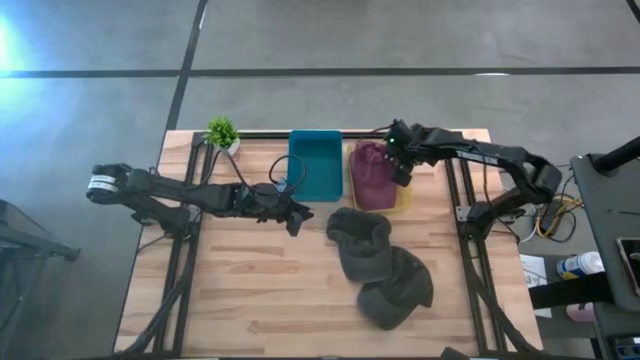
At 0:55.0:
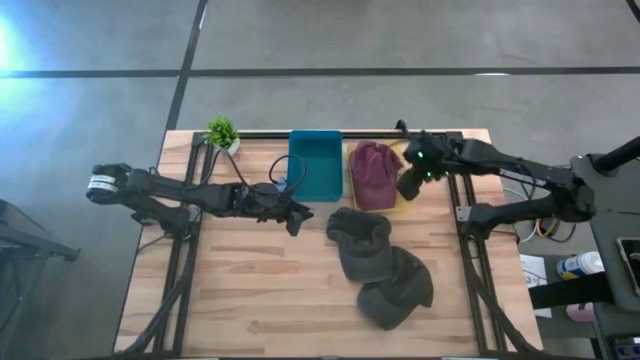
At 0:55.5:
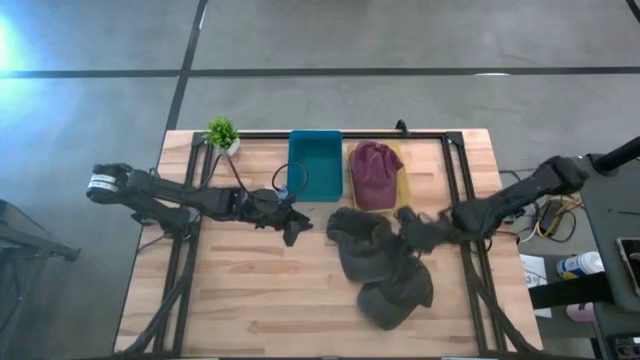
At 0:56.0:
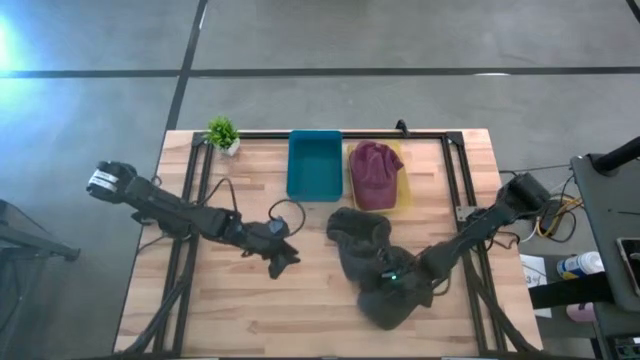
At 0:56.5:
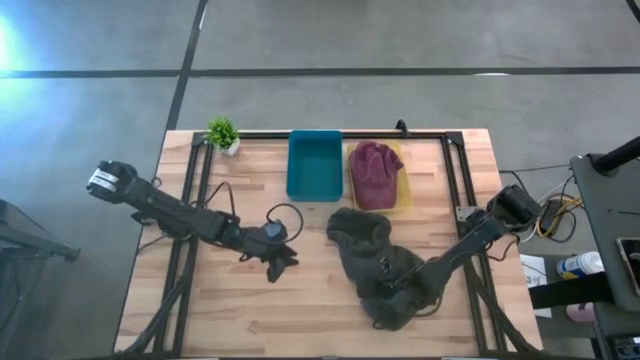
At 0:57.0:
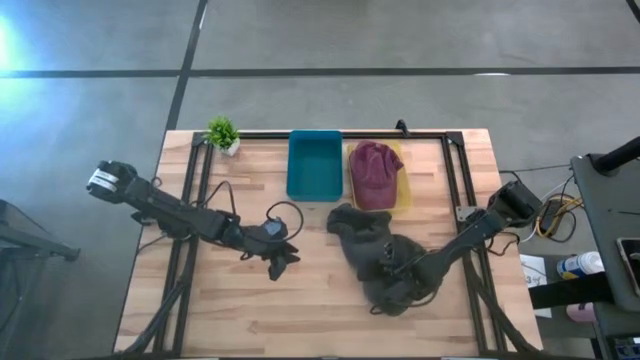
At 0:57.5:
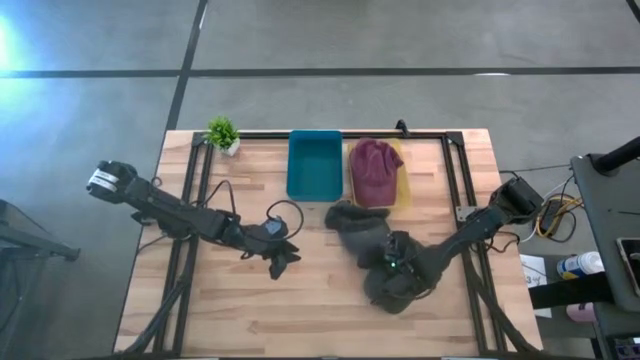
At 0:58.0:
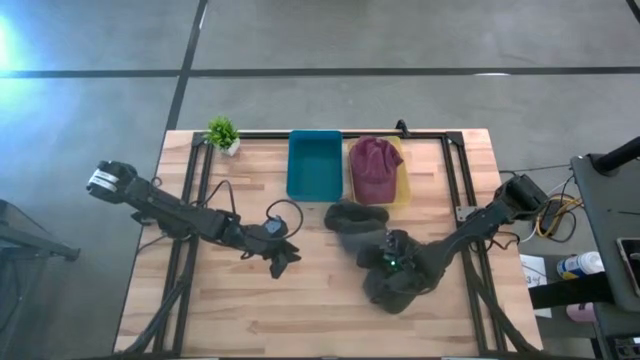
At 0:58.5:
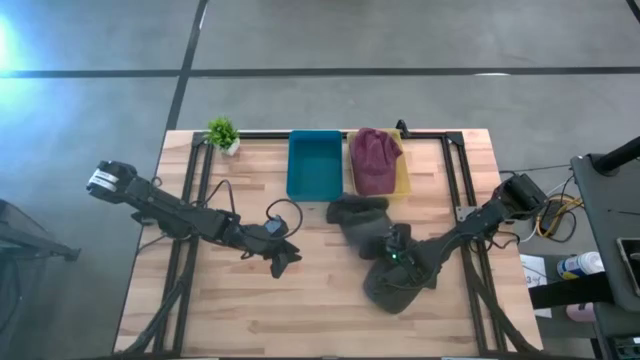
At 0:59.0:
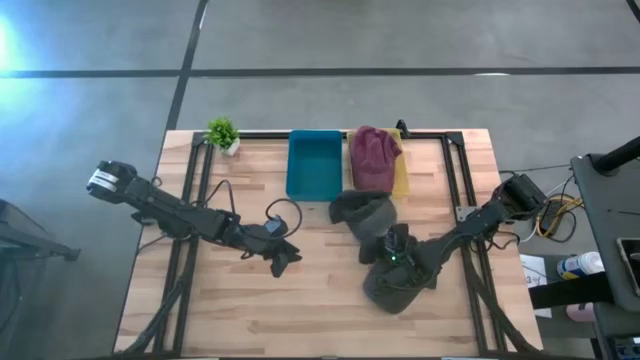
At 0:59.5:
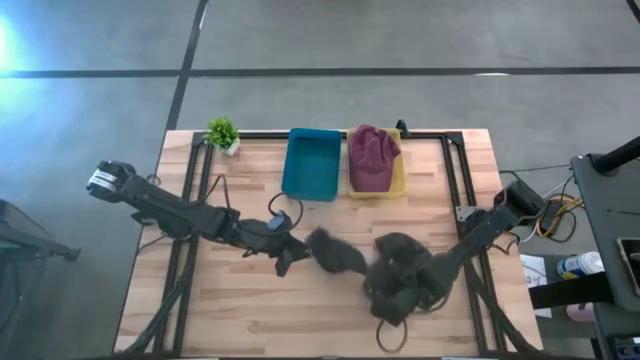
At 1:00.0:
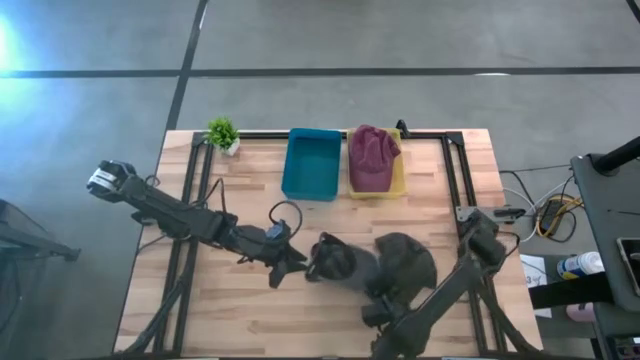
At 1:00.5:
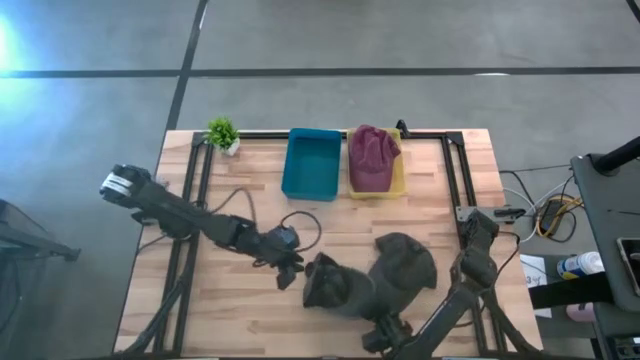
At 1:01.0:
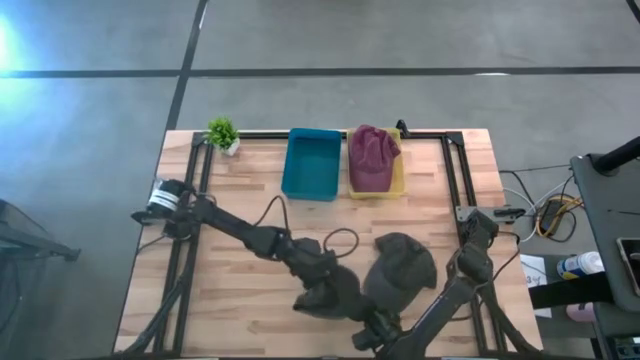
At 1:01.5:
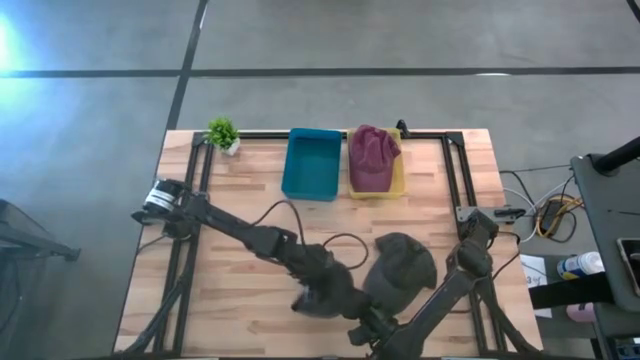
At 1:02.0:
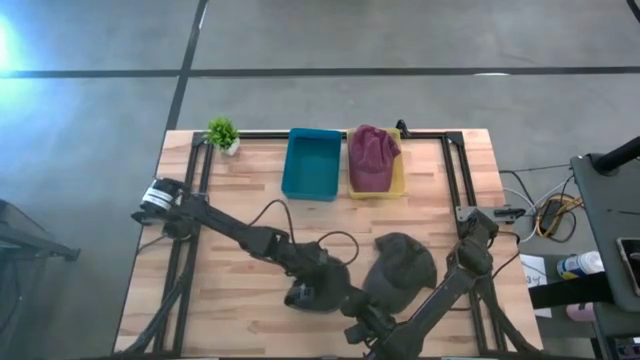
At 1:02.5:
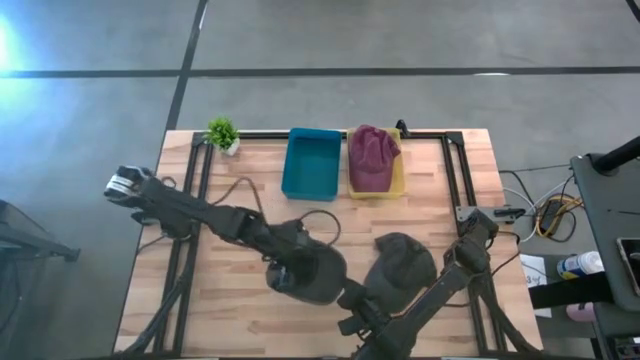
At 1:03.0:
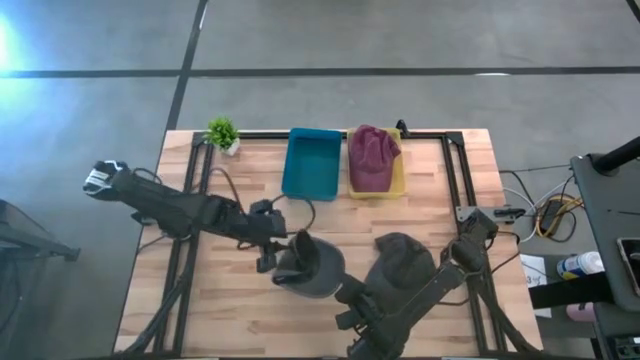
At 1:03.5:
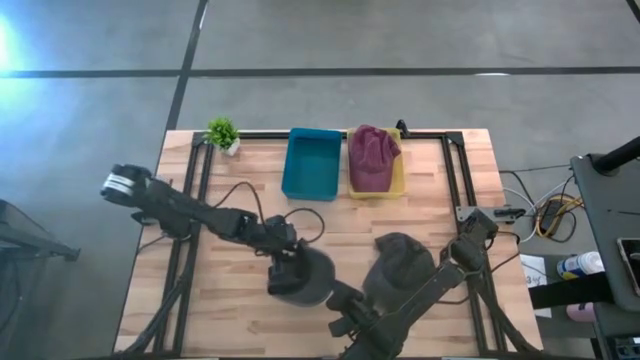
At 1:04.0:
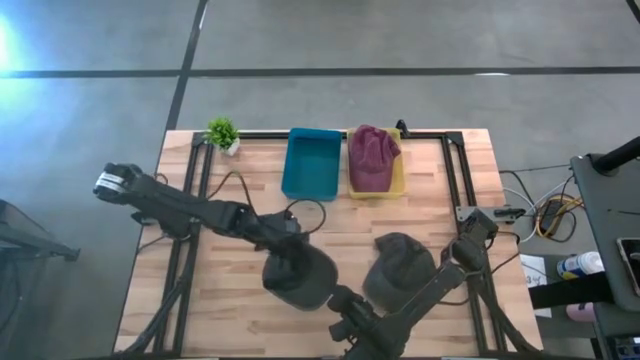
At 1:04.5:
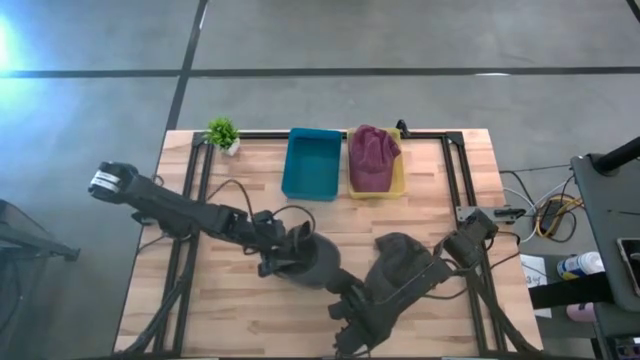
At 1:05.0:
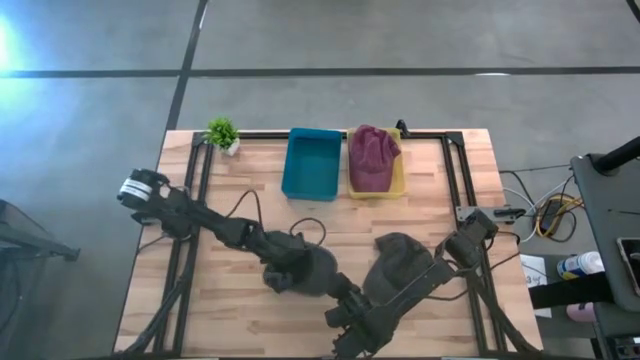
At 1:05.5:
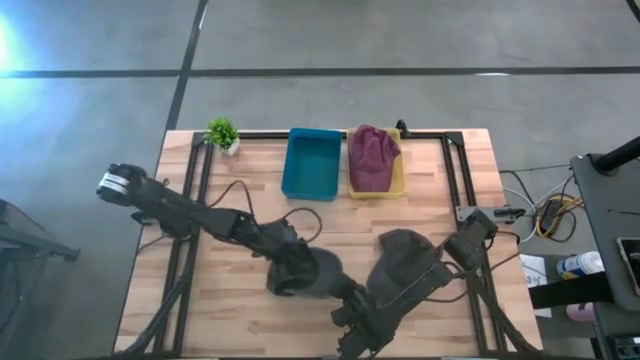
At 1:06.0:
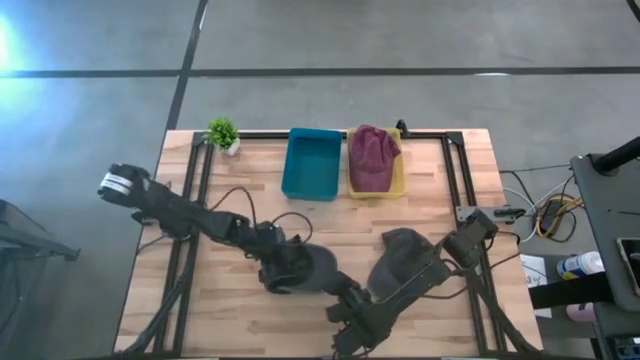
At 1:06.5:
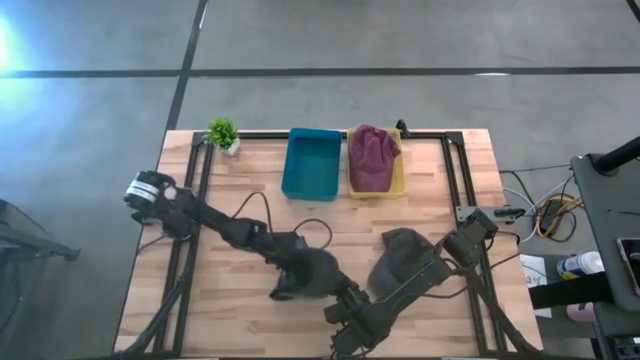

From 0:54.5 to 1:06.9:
Task: Pick & Place hat
Put the top black cap into the blue bin

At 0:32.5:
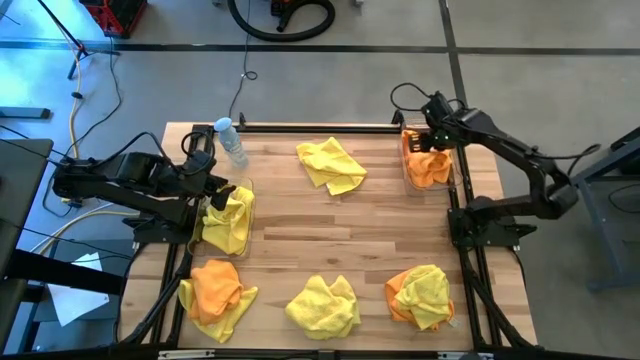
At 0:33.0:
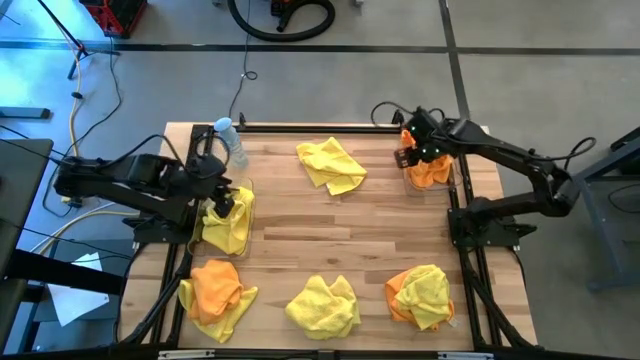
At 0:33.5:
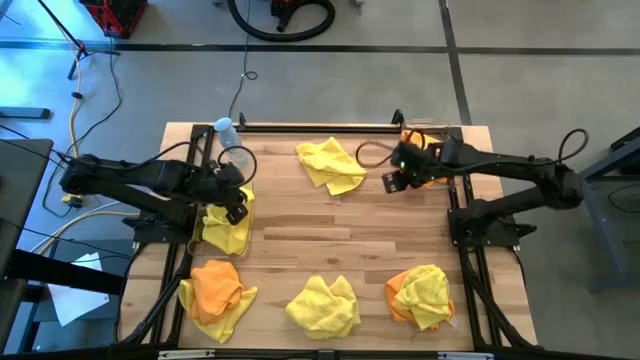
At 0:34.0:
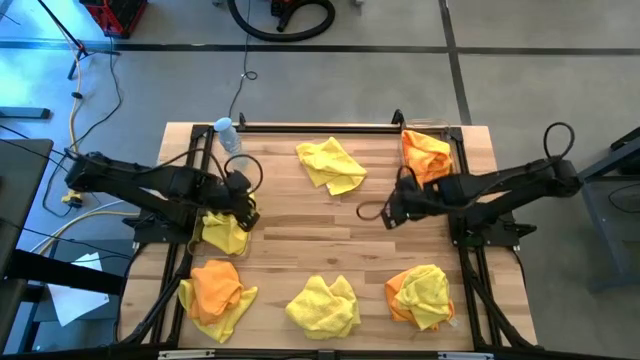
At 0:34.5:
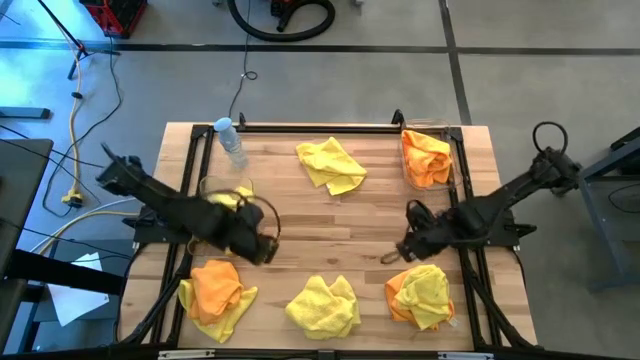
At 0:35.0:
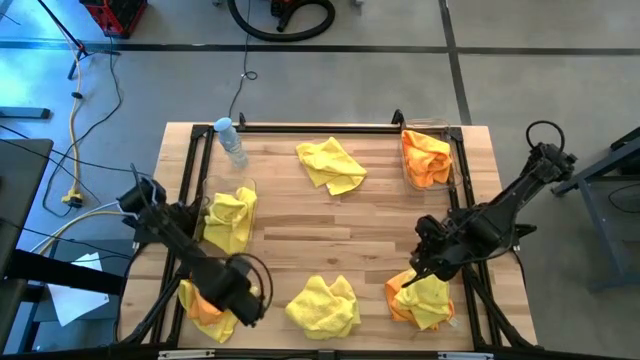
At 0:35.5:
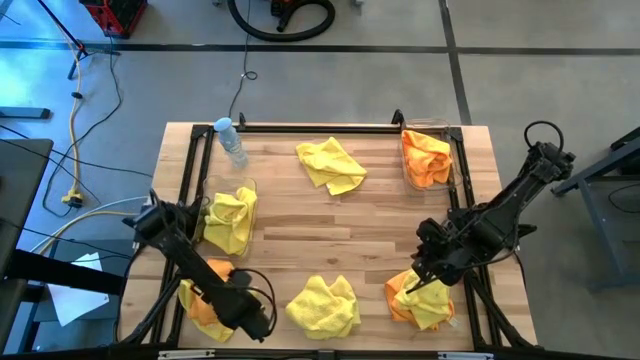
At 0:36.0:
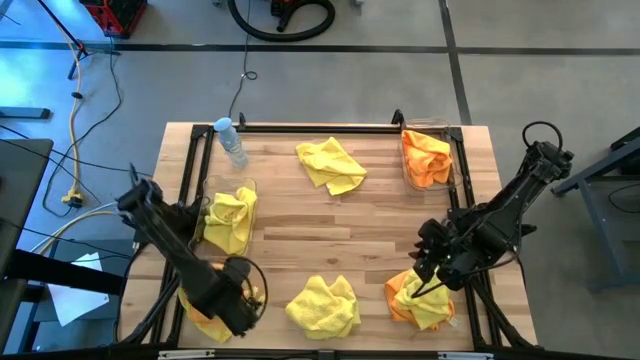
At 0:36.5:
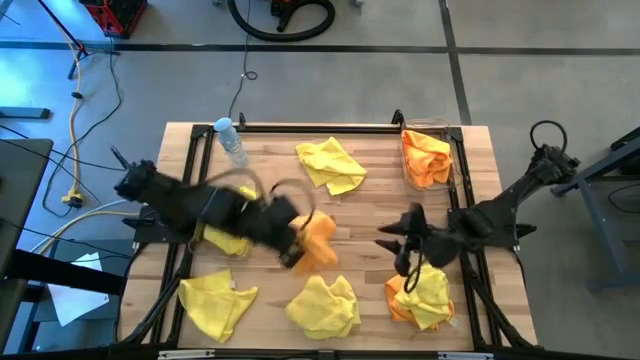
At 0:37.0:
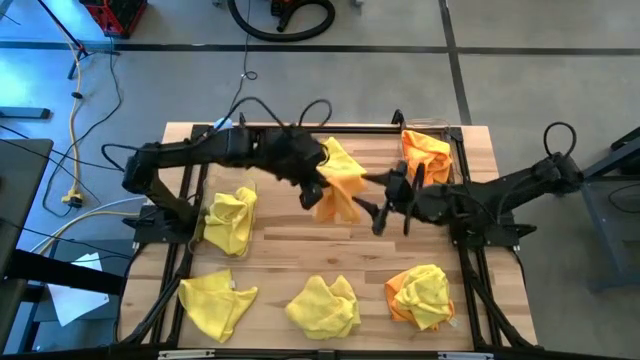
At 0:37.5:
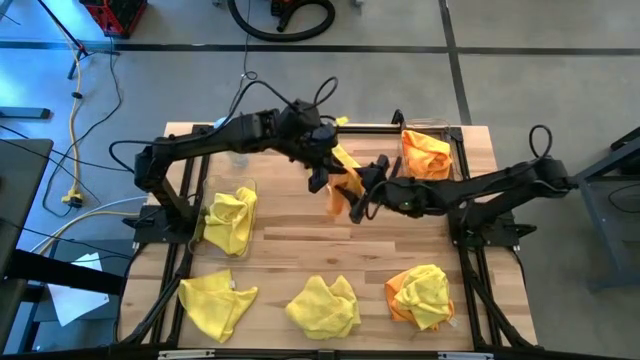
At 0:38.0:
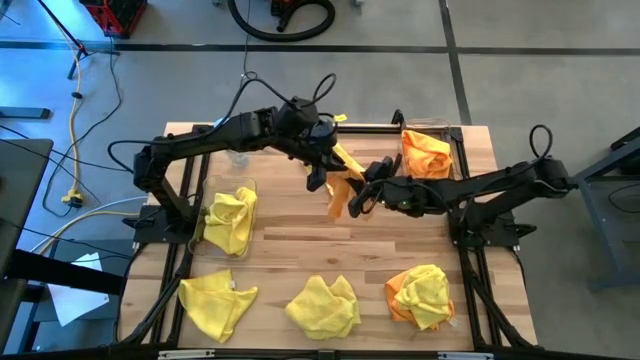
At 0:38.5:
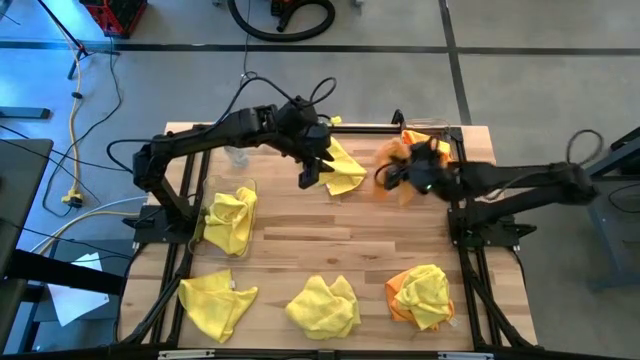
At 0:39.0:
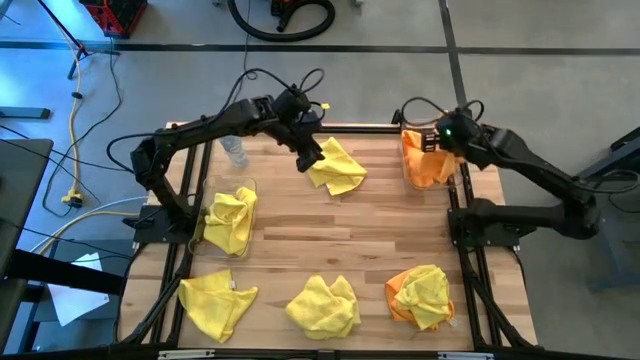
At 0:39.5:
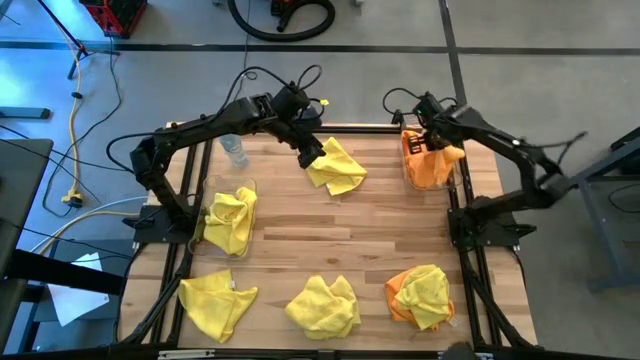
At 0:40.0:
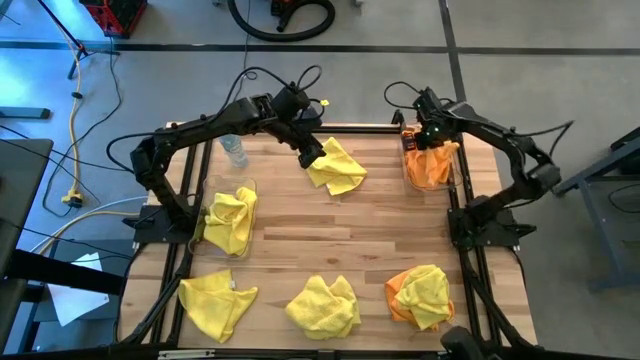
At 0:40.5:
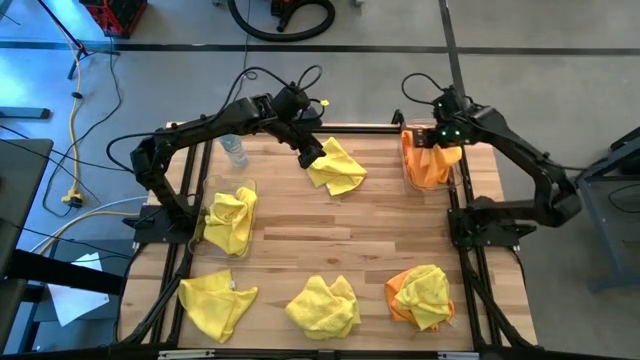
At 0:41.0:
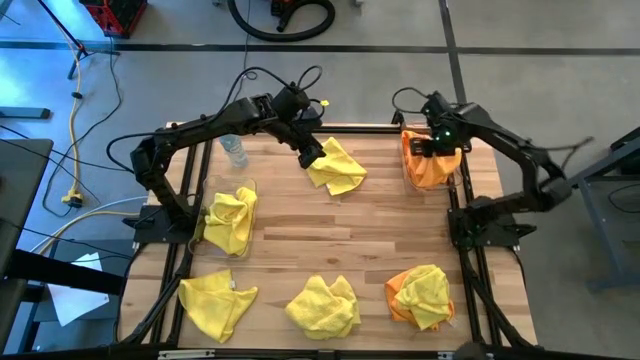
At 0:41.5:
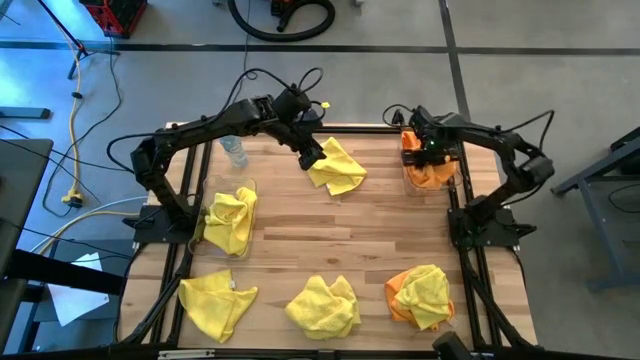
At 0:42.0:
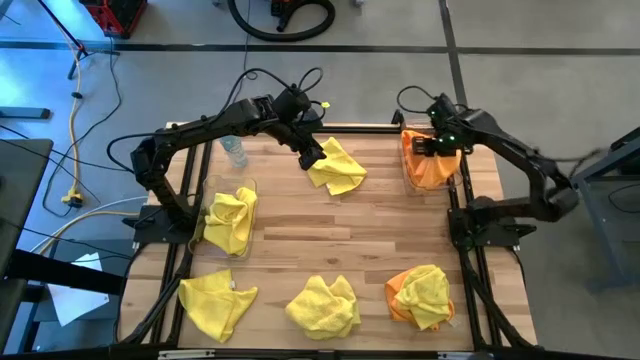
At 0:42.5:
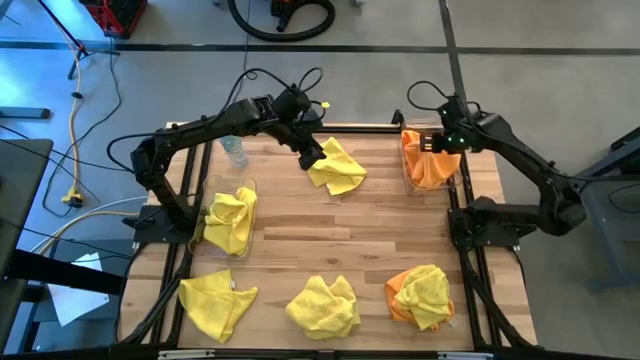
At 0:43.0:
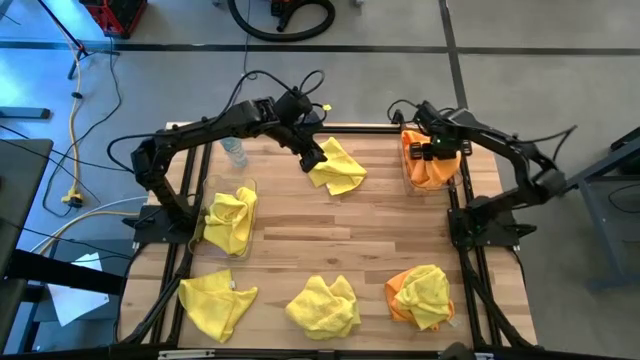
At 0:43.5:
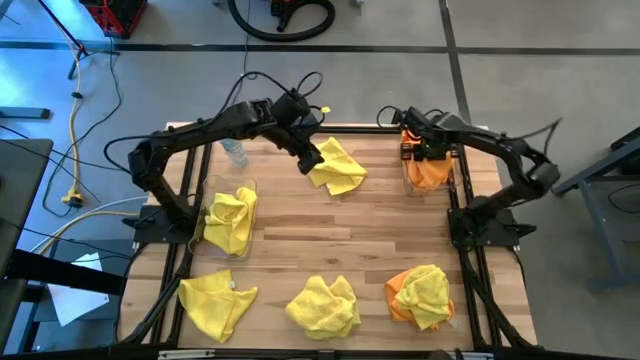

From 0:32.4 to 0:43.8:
Task: Sort microfiber towel by color & place in baskets
Put the orange microfiber cloth into the right transparent bin
